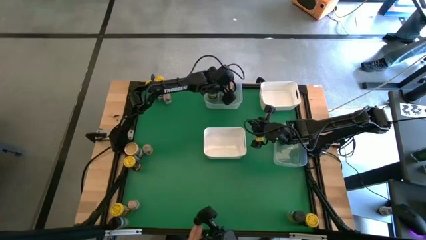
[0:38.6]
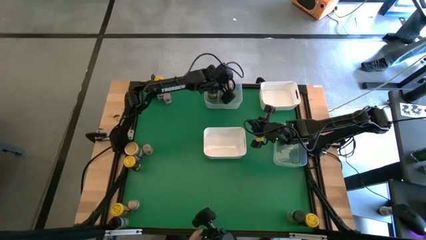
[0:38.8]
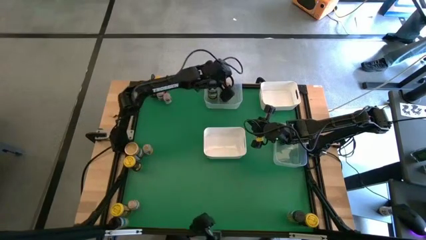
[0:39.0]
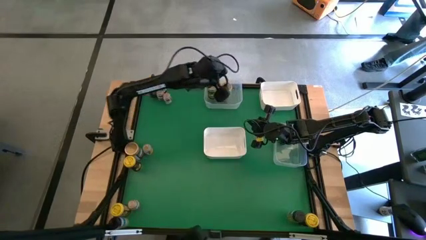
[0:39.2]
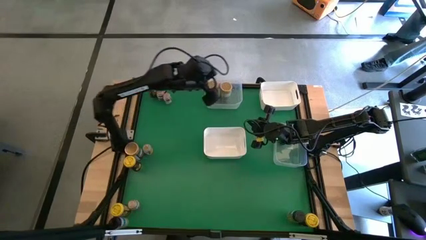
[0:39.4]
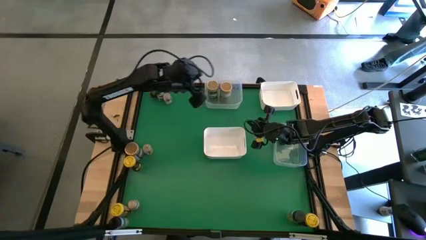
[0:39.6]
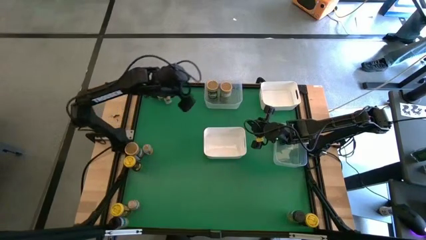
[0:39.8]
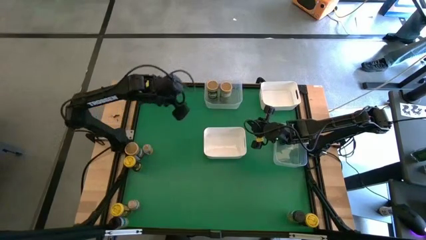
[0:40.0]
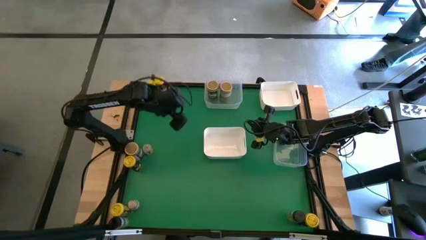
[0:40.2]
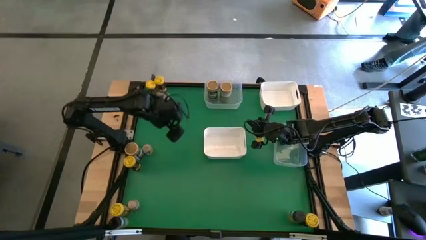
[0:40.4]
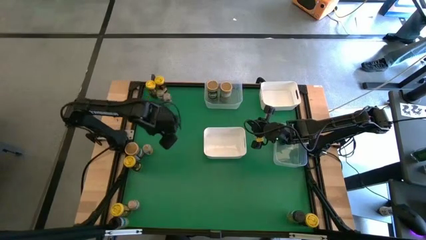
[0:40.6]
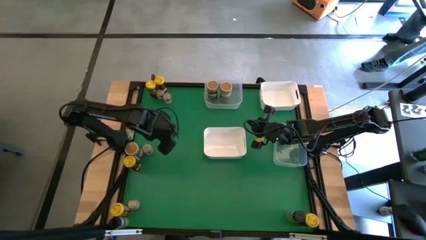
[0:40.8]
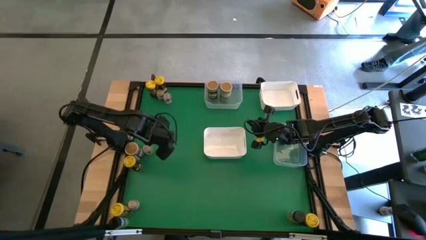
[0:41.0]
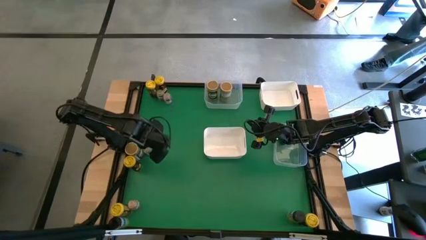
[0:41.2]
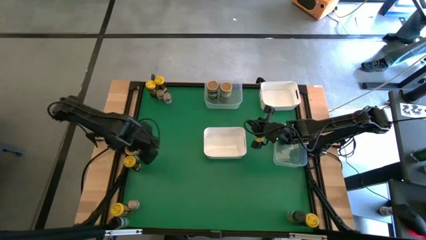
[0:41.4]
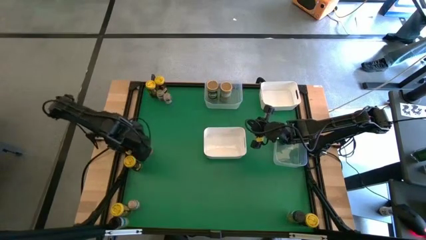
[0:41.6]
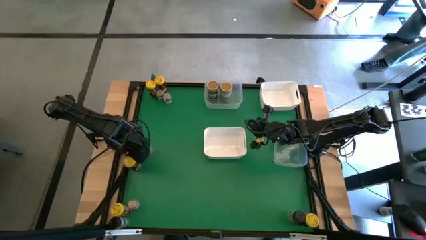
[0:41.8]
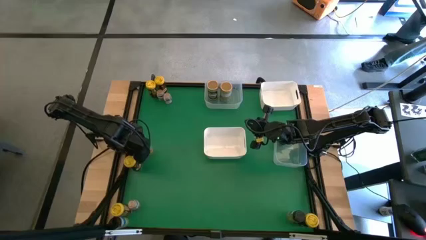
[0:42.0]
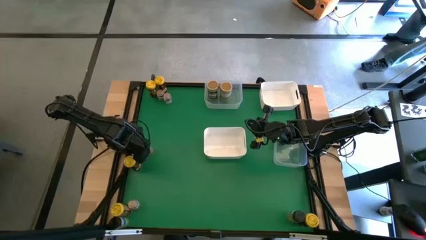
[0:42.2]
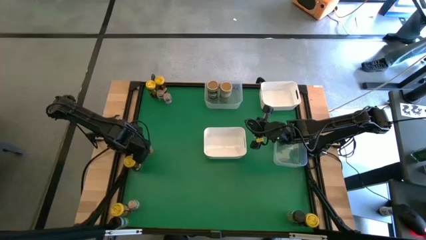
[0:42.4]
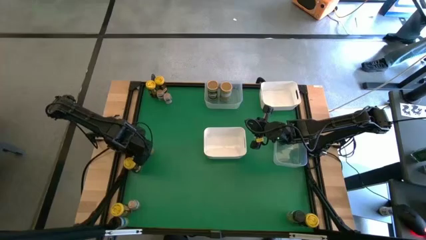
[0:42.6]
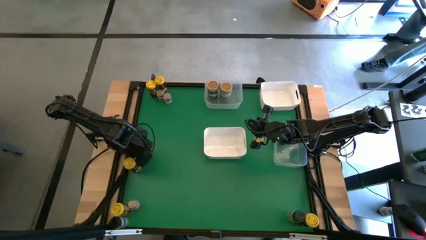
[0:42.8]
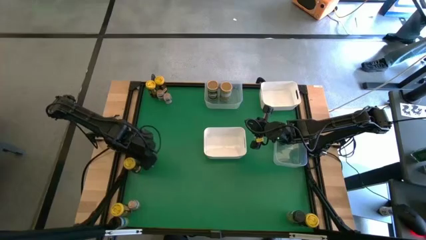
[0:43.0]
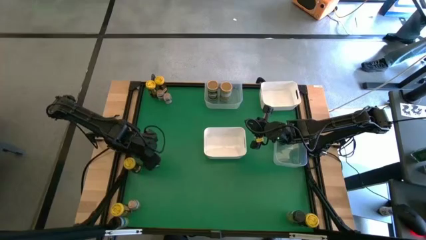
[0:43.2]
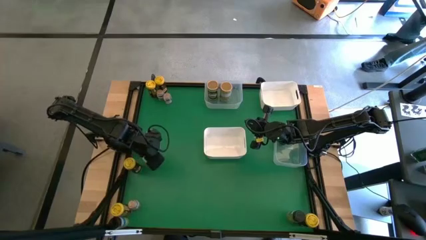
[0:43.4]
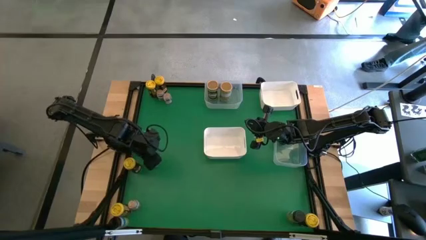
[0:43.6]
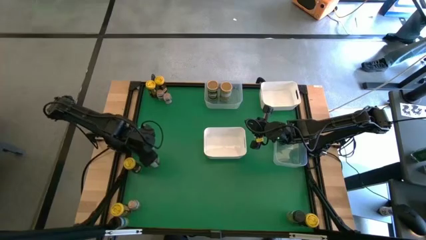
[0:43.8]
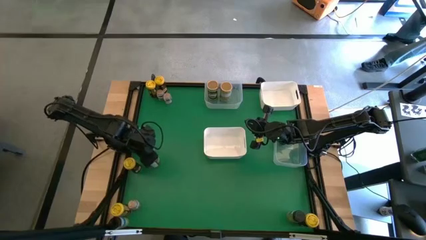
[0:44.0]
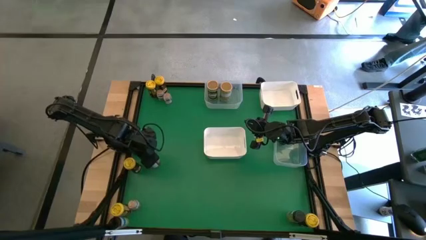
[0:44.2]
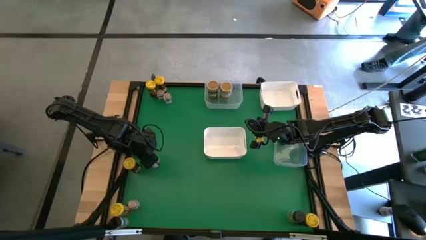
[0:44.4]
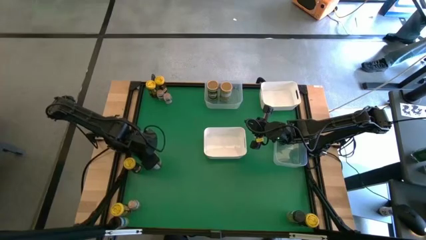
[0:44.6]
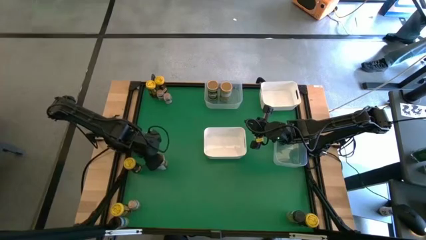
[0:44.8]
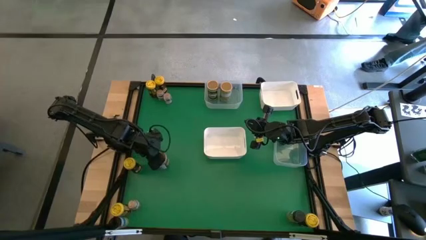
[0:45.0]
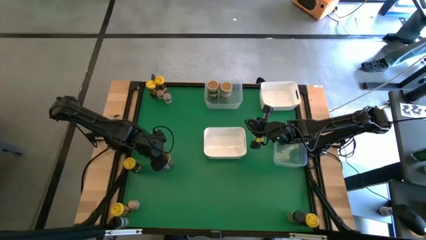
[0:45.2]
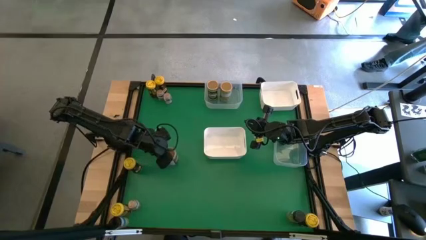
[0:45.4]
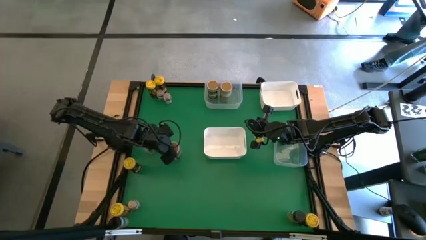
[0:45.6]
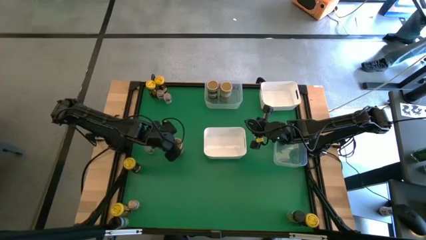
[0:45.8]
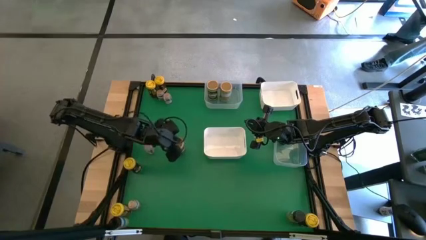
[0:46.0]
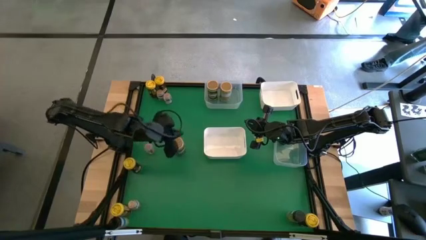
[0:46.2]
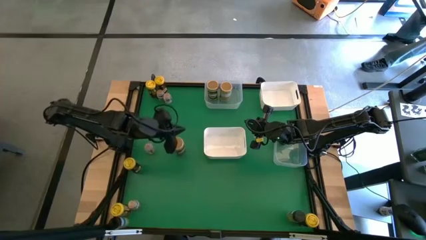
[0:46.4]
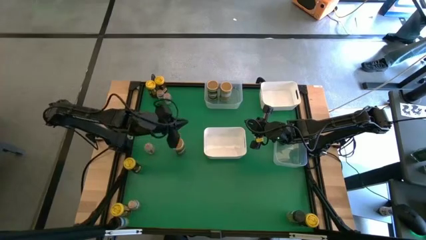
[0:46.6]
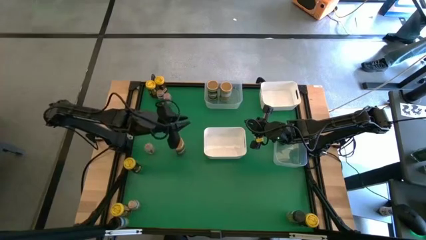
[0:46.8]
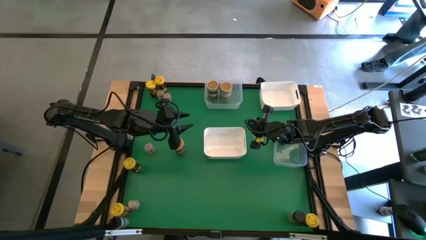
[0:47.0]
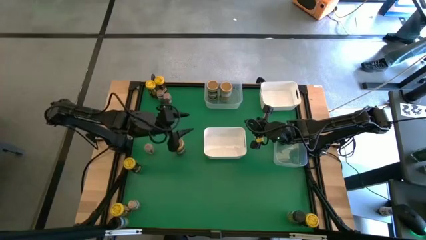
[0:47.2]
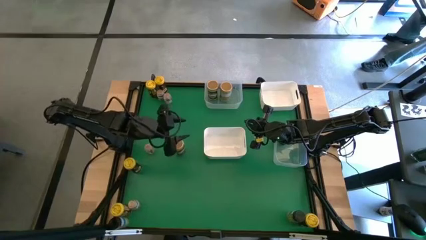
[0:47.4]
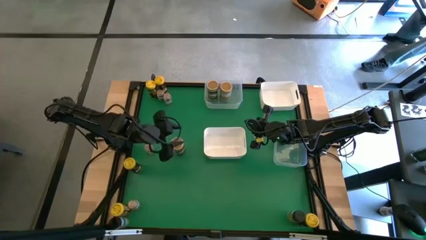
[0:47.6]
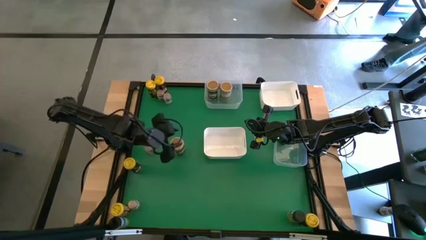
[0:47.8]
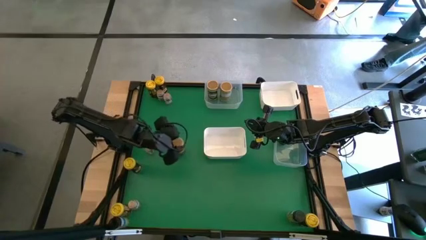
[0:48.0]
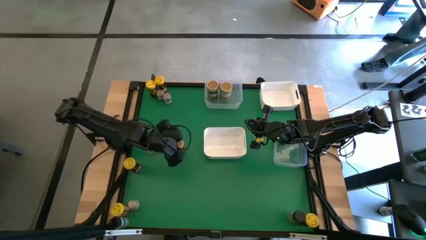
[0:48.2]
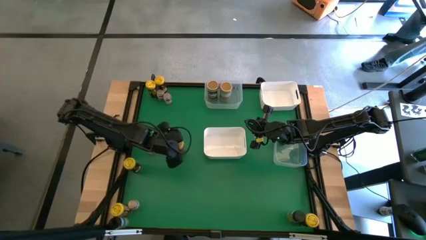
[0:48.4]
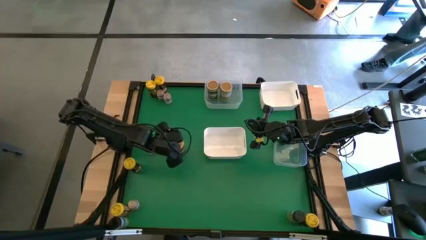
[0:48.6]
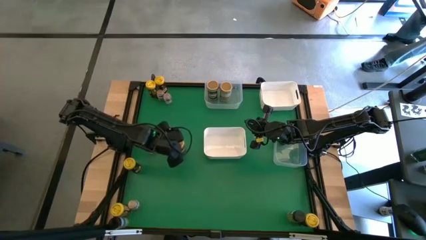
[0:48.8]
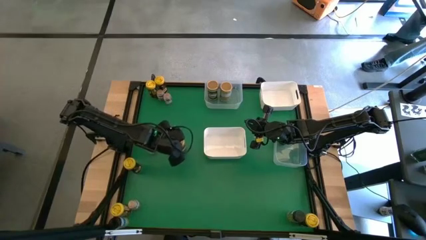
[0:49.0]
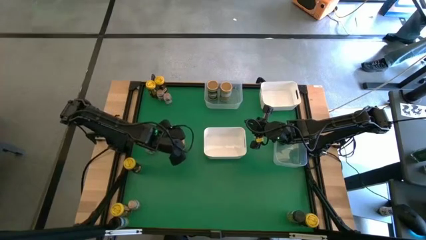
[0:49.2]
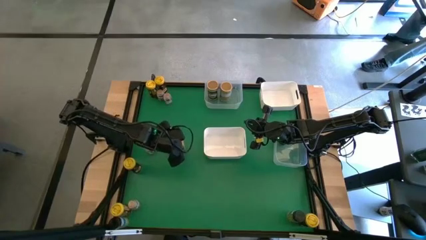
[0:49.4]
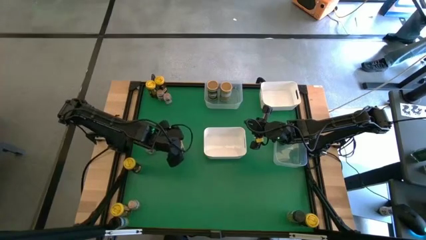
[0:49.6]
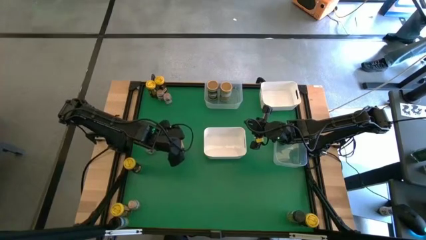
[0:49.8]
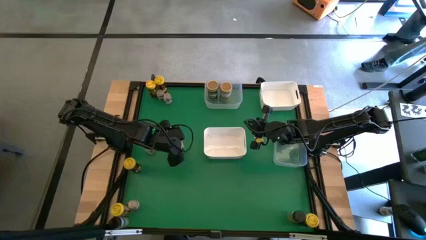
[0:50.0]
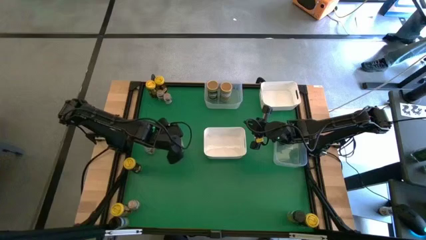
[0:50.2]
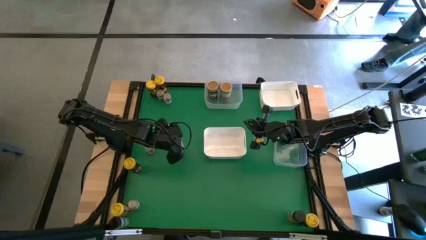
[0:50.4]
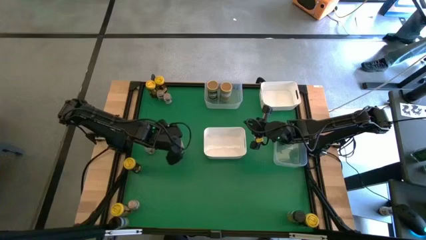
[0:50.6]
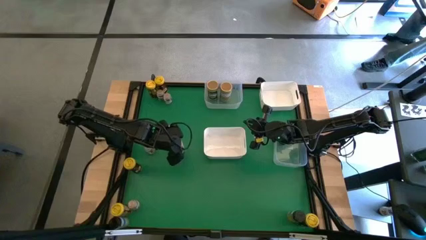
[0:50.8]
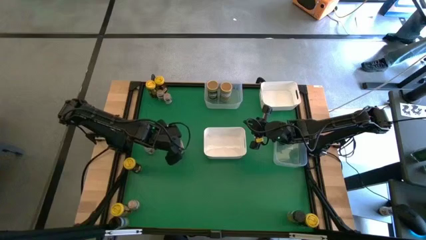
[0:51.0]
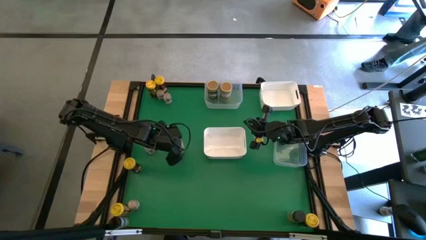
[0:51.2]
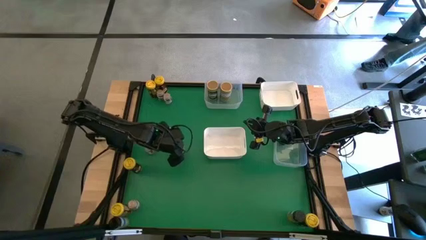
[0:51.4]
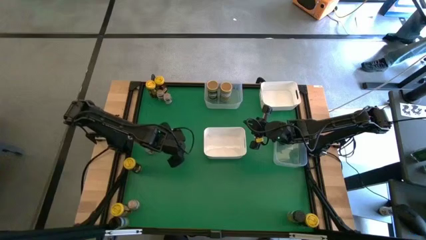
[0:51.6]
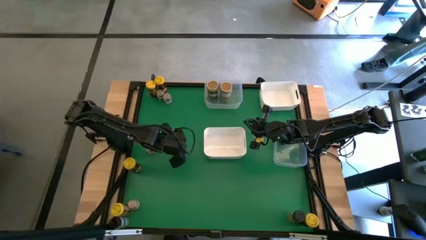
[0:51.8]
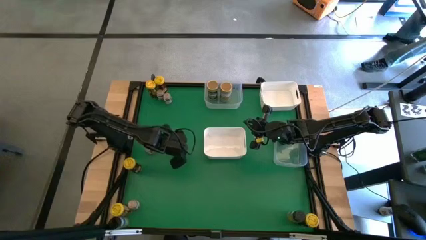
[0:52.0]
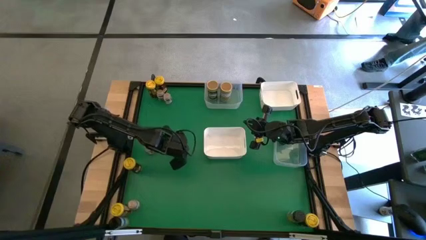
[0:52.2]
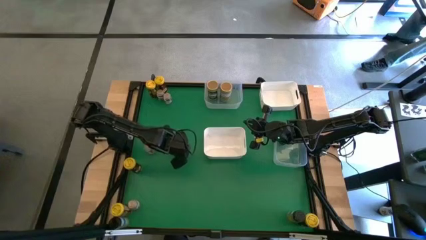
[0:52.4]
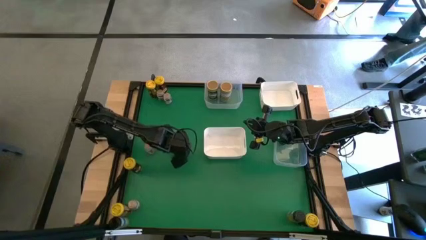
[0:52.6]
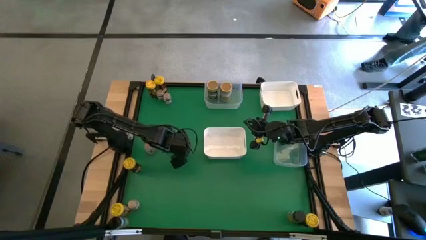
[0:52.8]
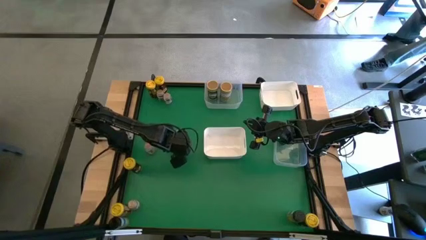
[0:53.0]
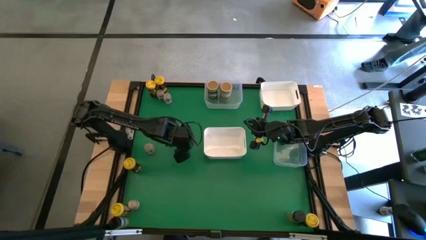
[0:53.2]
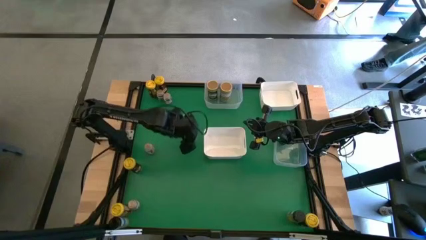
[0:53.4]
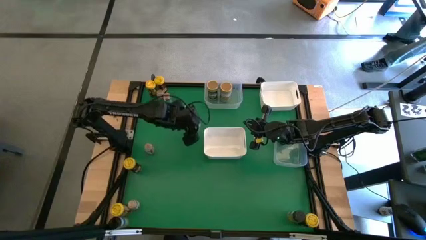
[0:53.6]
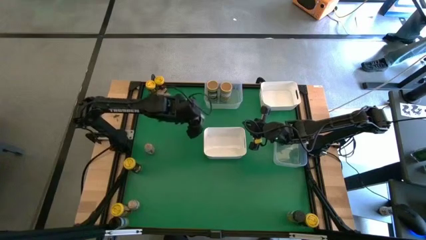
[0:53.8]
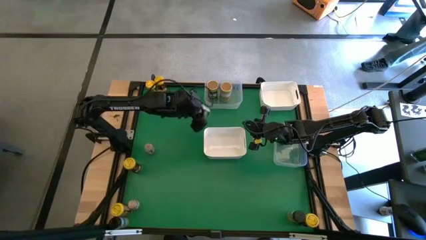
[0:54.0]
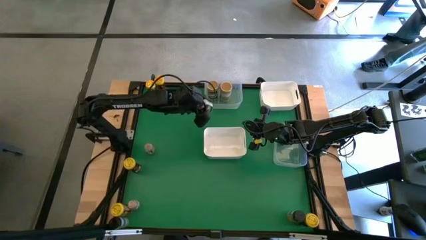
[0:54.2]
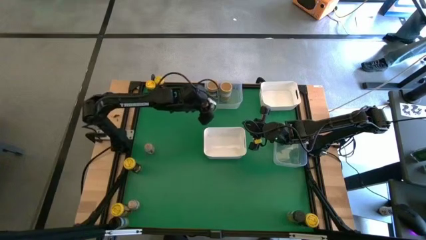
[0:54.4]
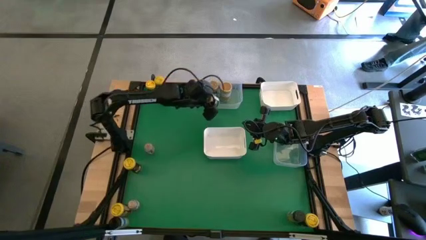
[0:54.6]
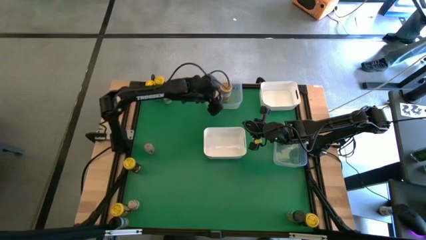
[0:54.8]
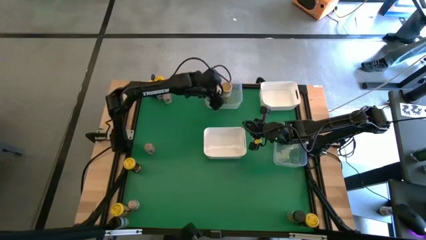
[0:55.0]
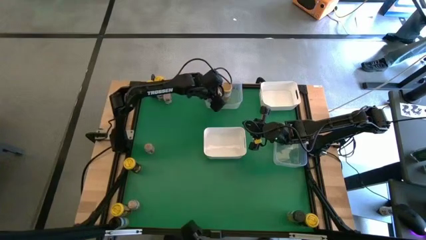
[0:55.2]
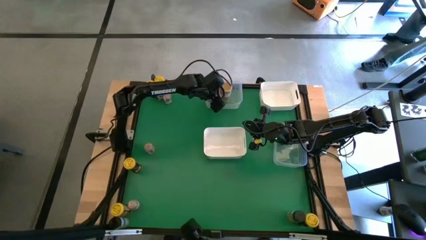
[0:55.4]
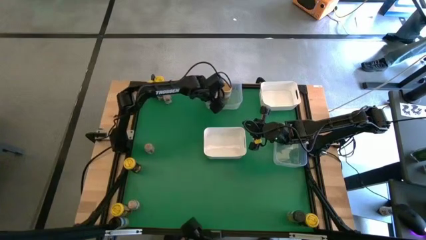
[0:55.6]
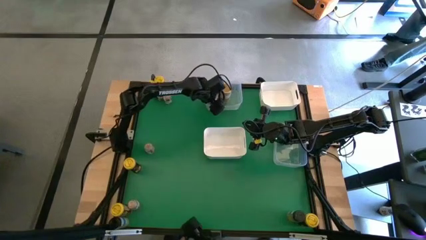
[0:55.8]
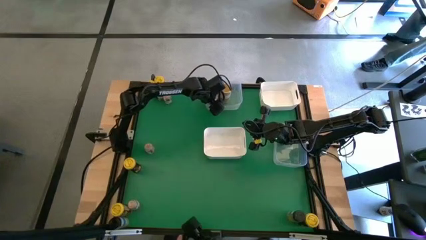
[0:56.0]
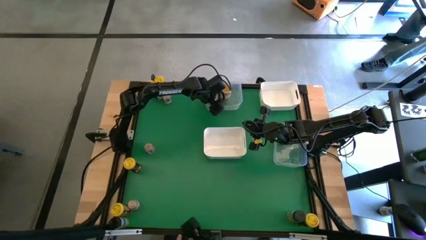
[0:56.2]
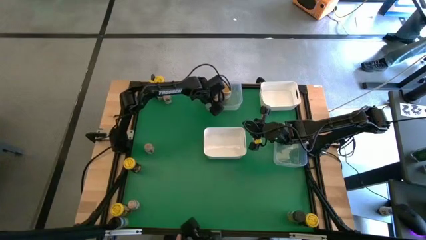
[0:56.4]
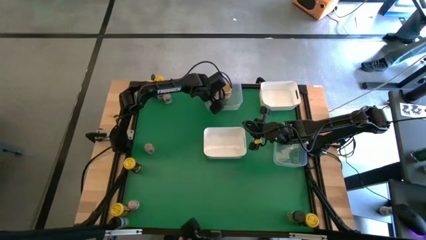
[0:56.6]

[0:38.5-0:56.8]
Task: Sort spices by type
Put the golden seasoning bottle into the top transparent bin
